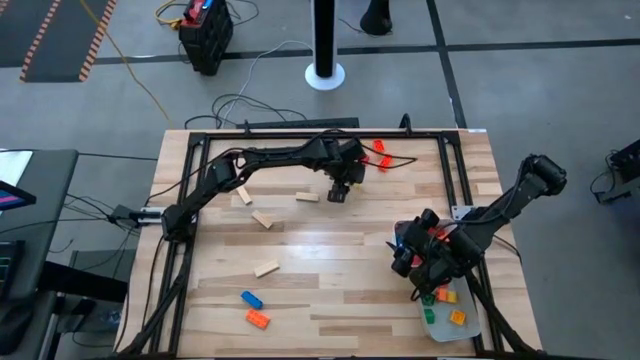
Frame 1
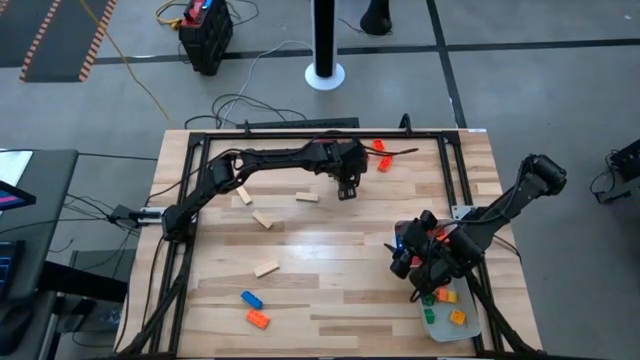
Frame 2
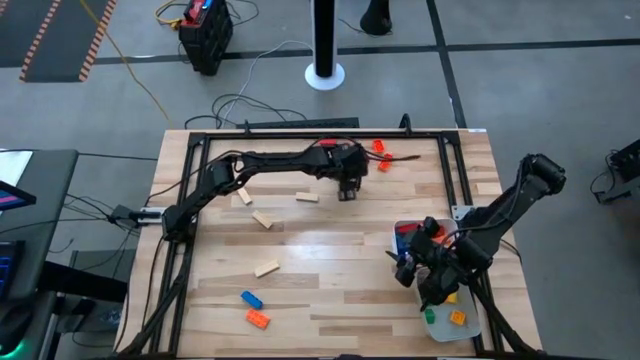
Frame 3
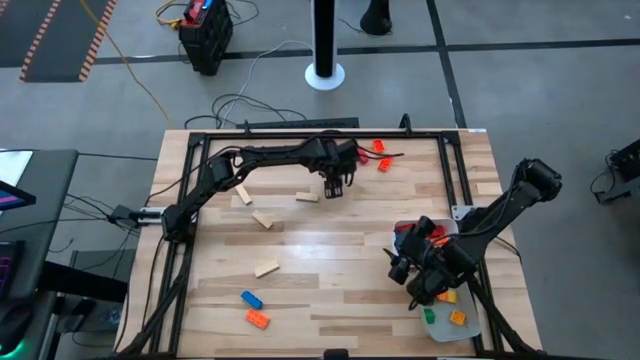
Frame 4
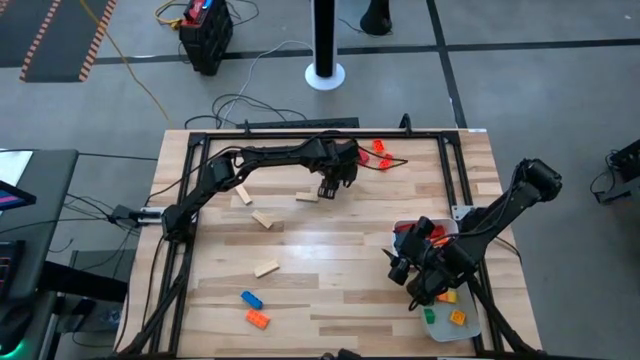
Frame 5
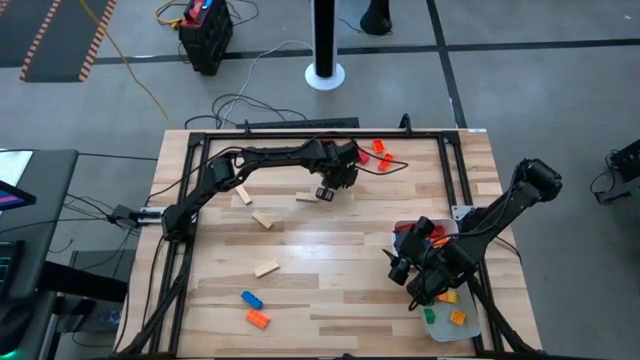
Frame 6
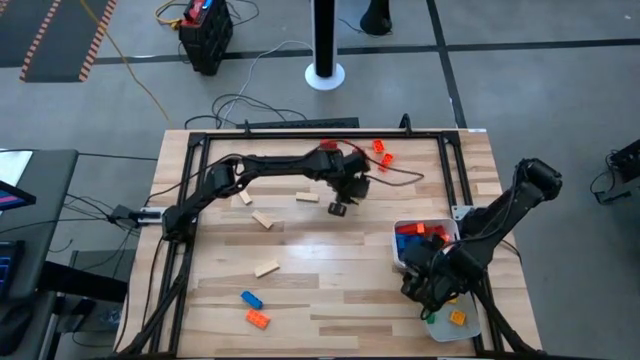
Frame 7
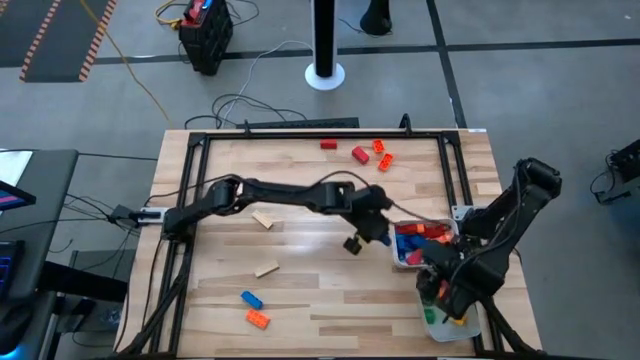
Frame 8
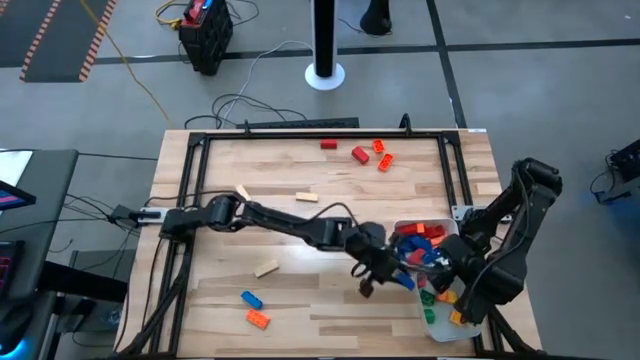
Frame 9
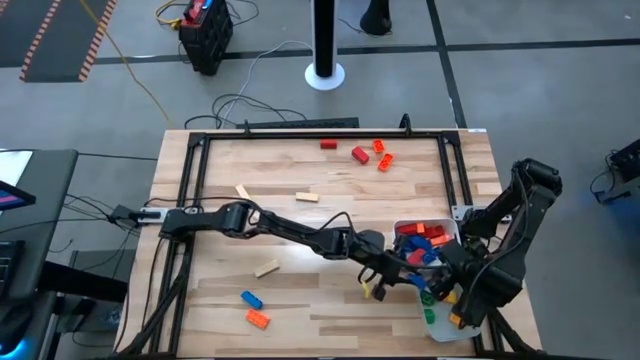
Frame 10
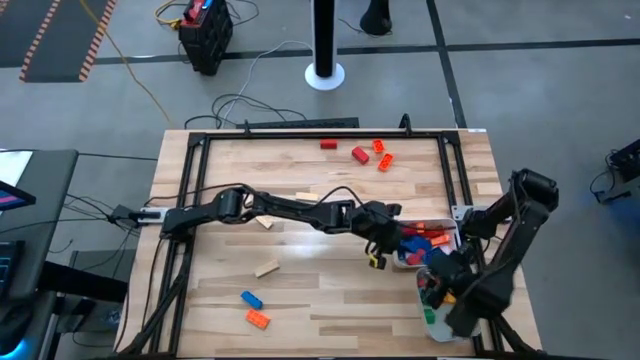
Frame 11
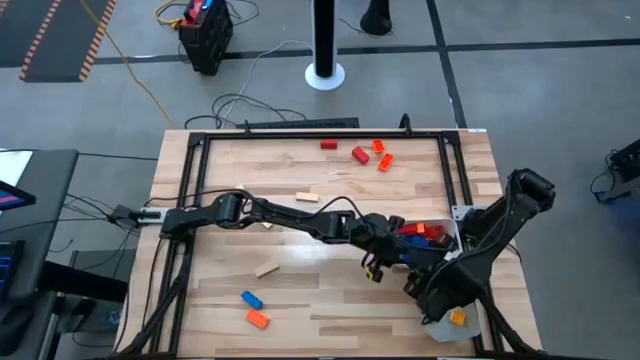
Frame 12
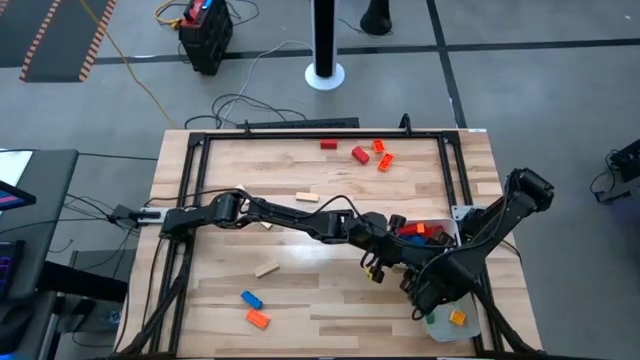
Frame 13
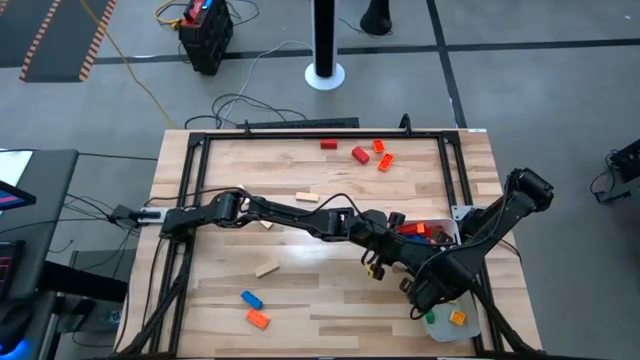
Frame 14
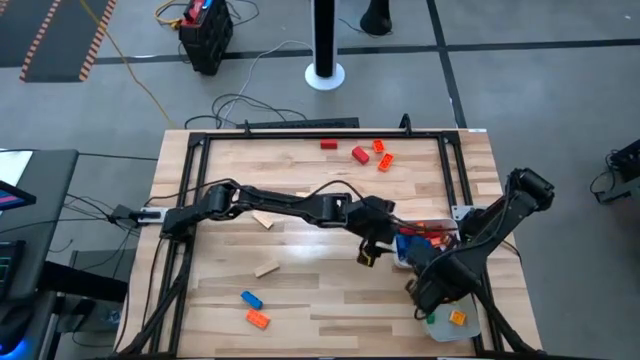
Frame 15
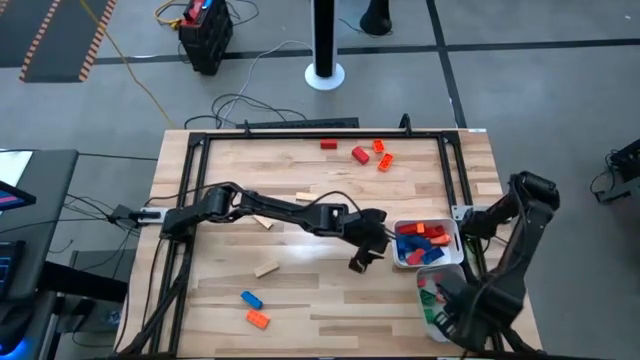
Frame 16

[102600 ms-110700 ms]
Task: Sort blocks by size
Put the 4 stud blue game piece into the grey bin

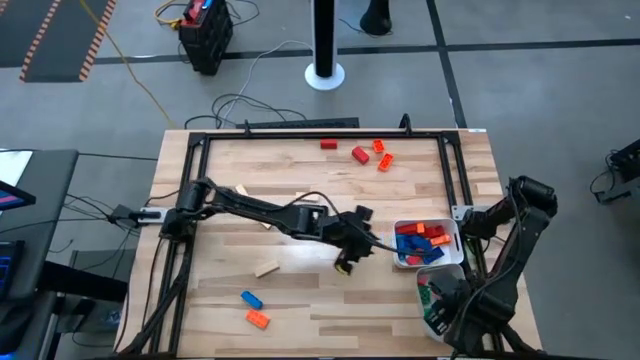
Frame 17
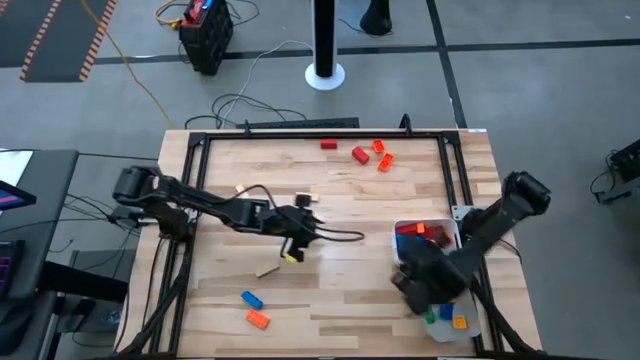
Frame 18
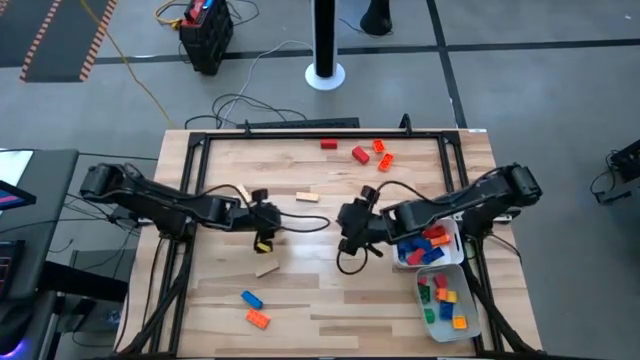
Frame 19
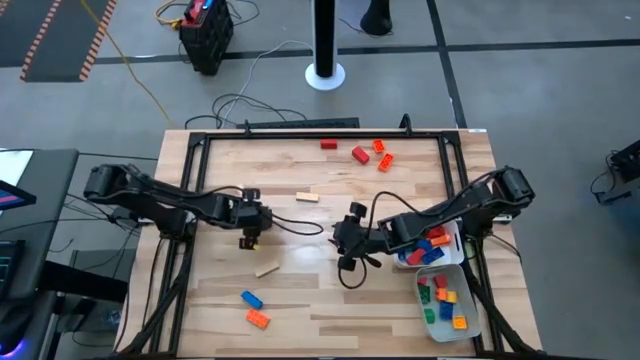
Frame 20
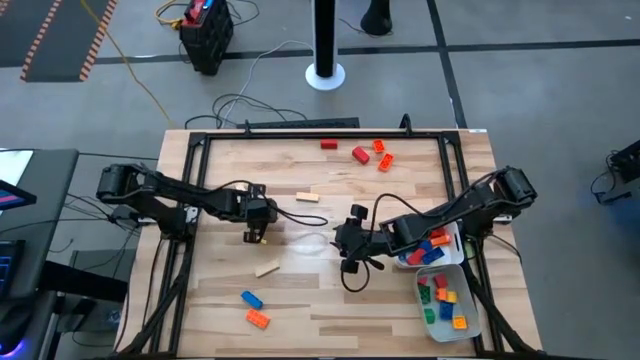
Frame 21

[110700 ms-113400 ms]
Put the wooden block into the white bin

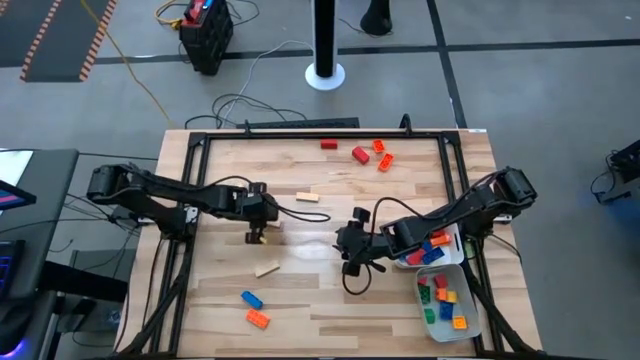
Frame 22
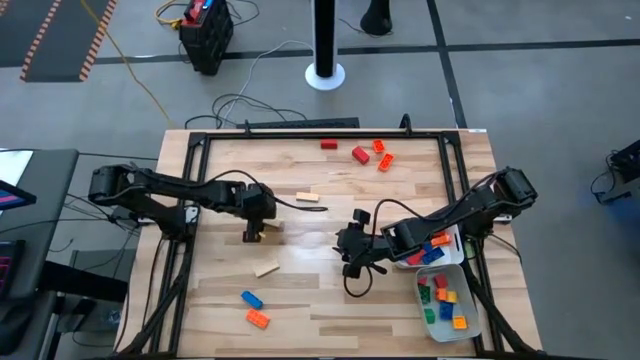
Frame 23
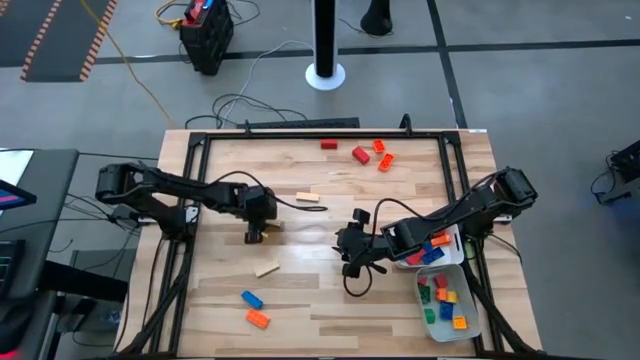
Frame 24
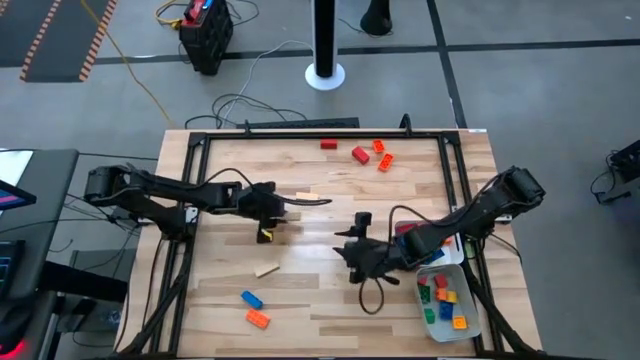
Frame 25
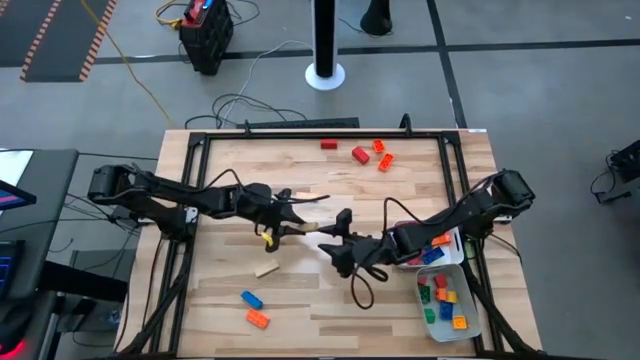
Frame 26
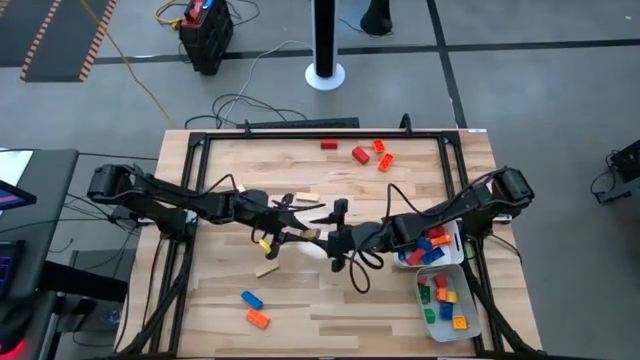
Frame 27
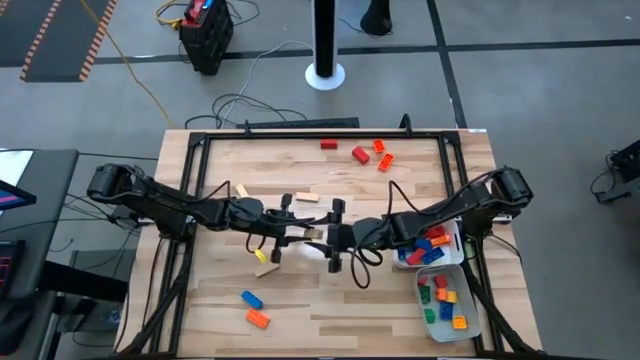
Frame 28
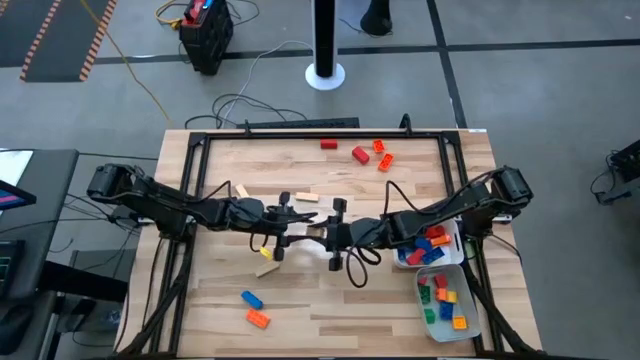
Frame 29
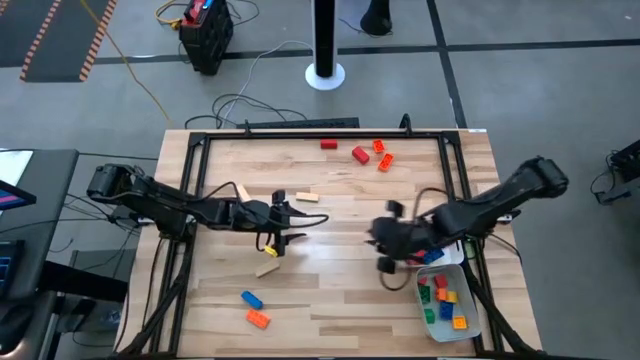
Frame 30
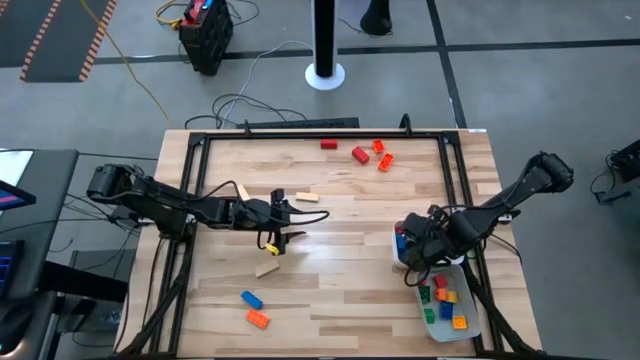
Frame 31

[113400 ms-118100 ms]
Put the wooden block into the white bin

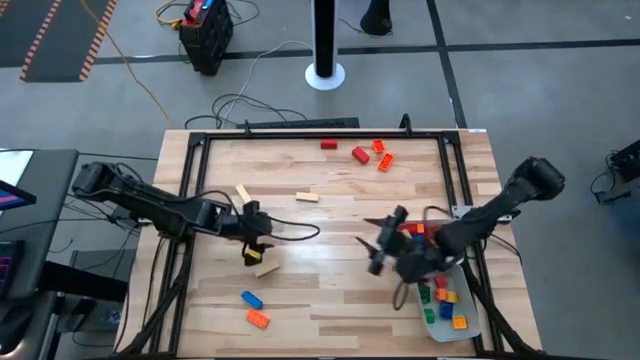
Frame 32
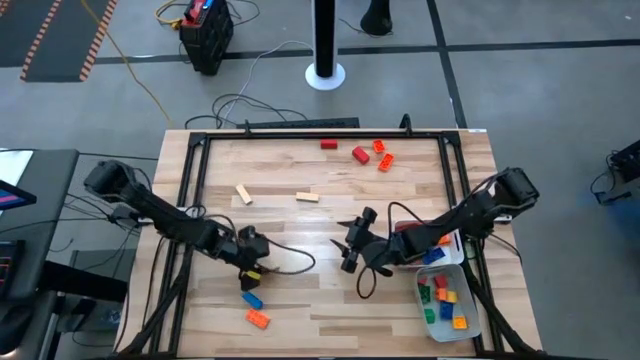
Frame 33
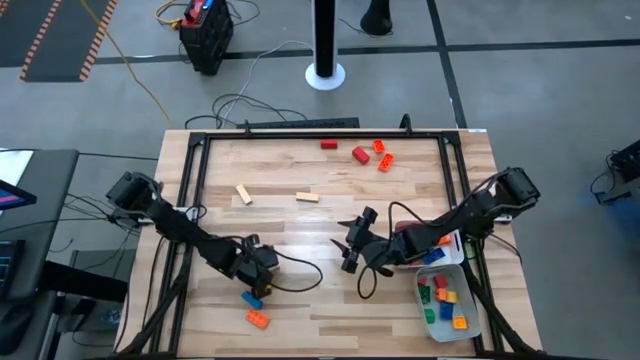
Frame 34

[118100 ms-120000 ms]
Put the wooden block into the white bin

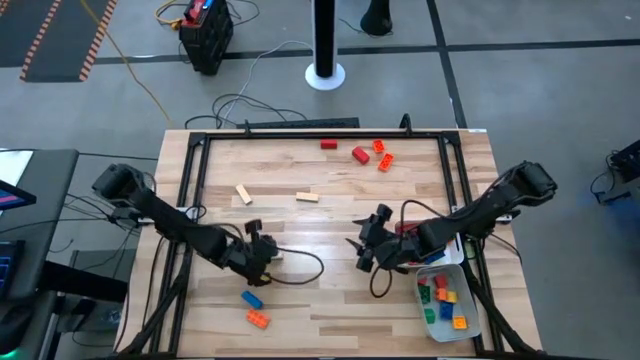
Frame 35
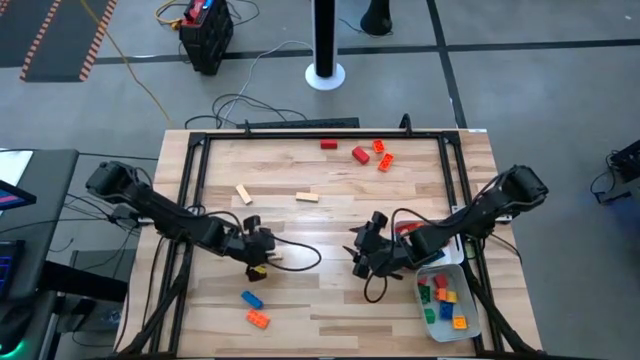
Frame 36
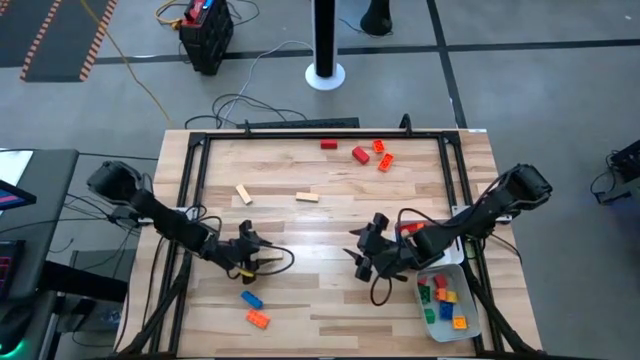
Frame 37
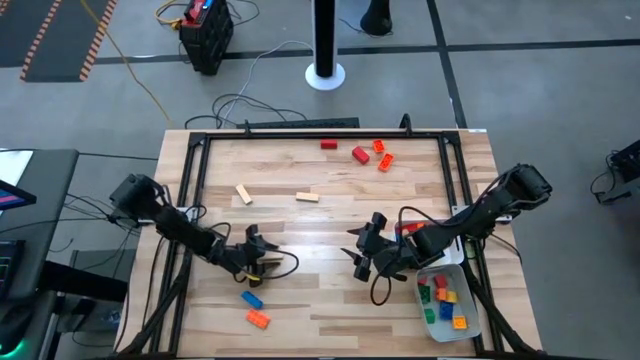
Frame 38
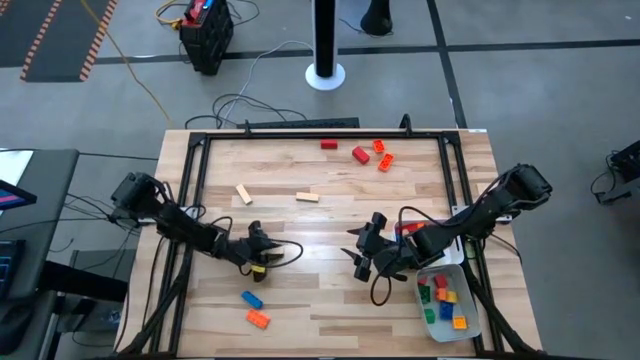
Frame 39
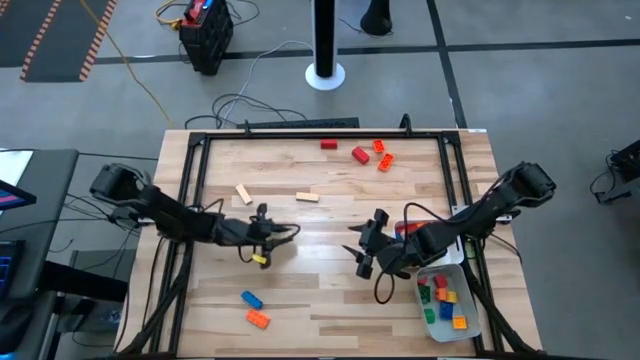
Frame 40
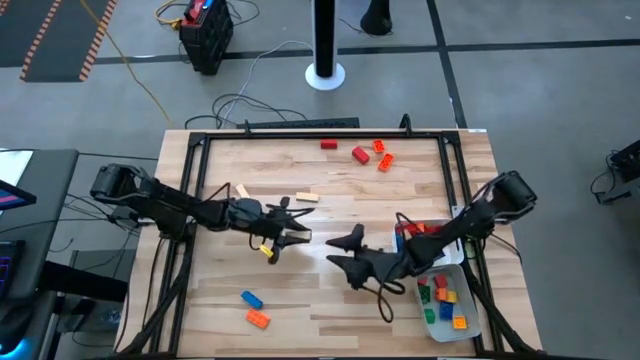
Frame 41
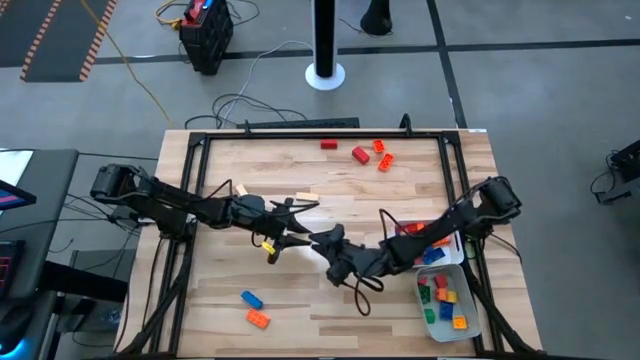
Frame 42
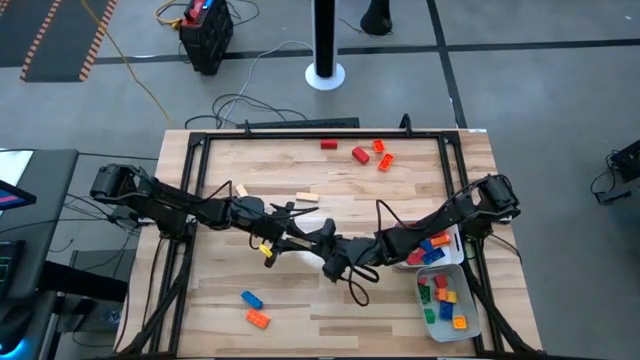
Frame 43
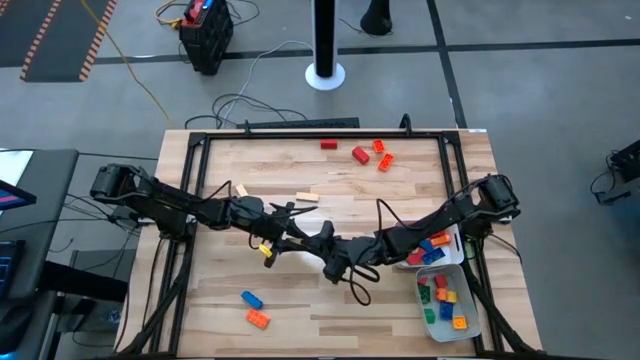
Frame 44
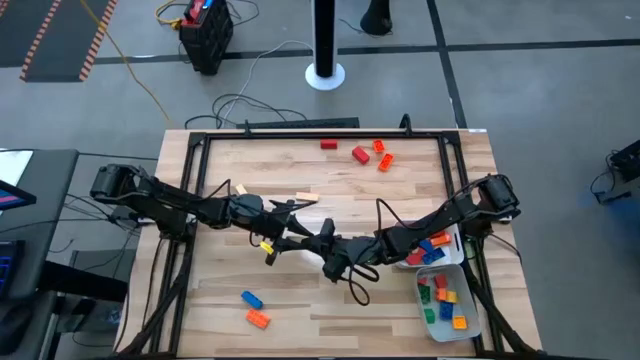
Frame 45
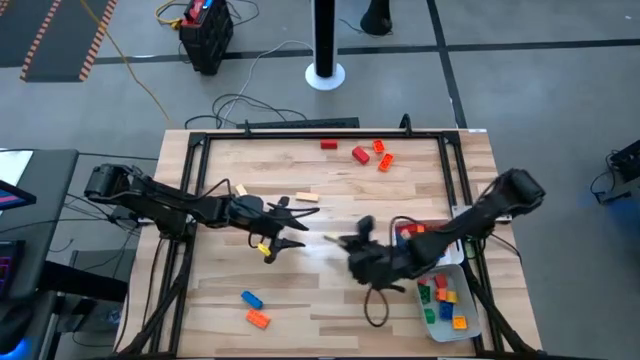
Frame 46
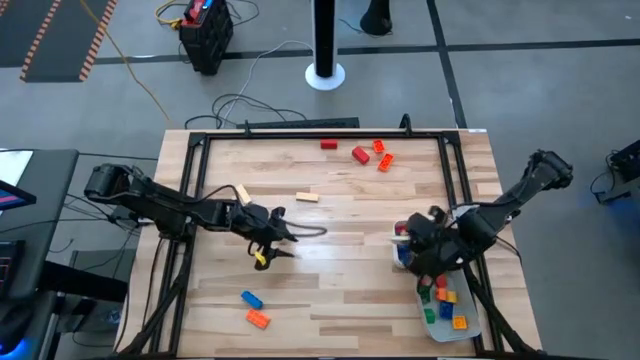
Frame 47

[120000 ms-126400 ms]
Put the wooden block into the white bin
